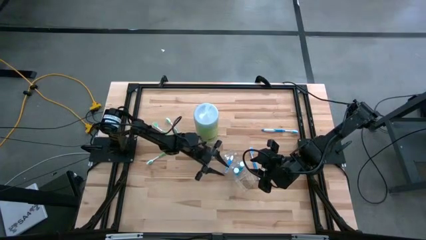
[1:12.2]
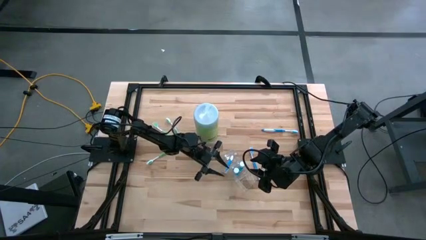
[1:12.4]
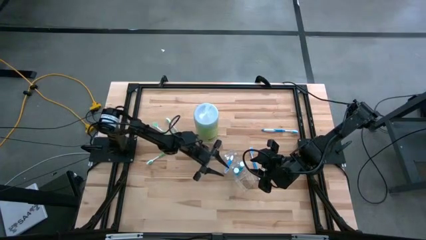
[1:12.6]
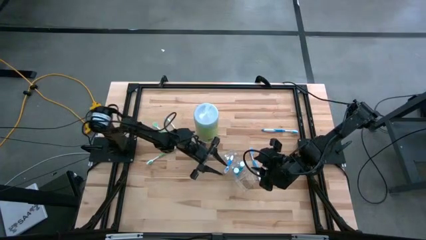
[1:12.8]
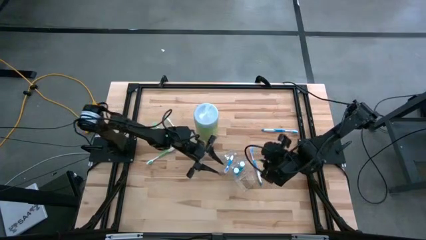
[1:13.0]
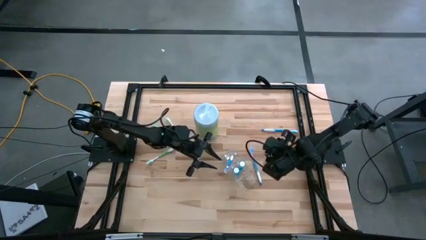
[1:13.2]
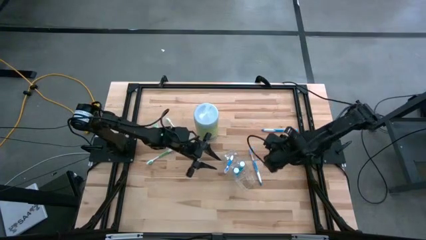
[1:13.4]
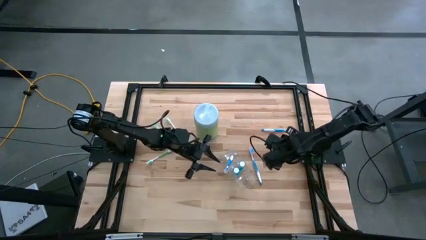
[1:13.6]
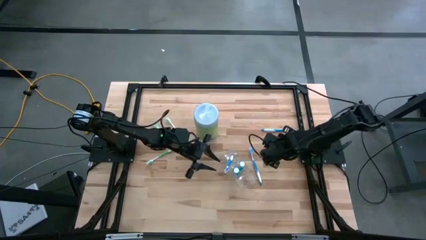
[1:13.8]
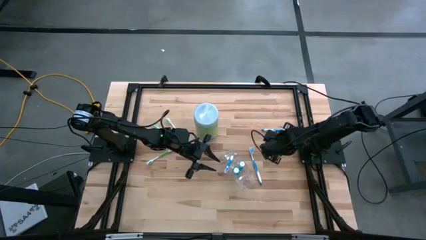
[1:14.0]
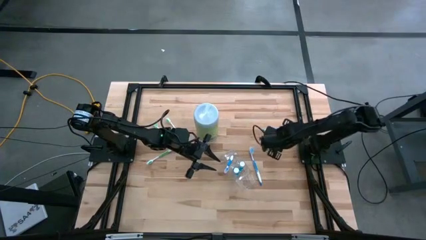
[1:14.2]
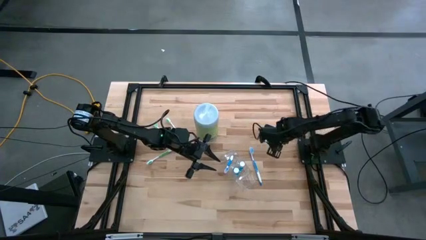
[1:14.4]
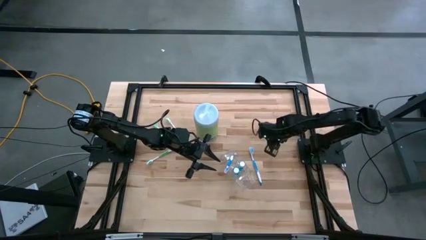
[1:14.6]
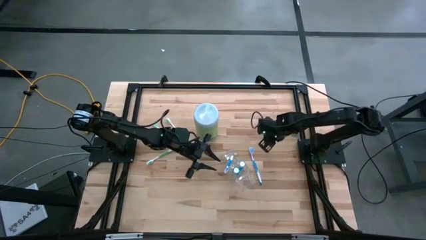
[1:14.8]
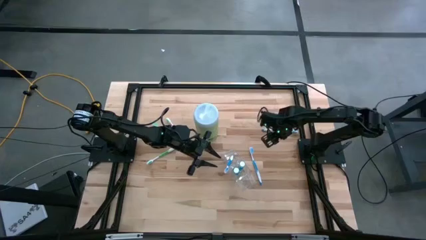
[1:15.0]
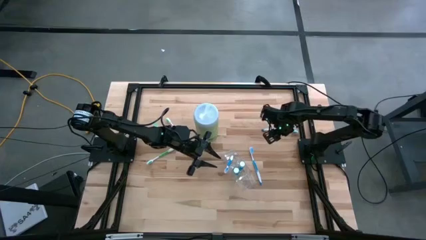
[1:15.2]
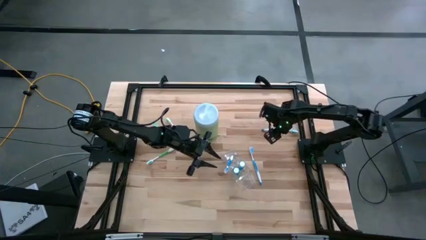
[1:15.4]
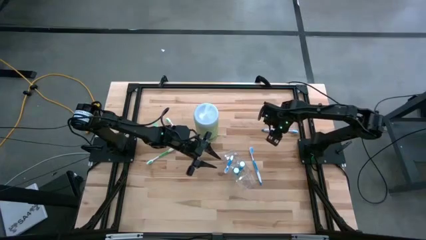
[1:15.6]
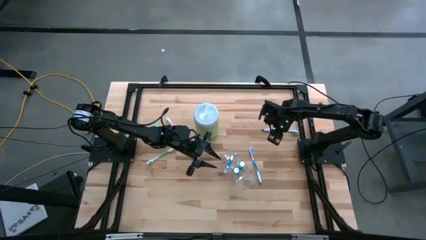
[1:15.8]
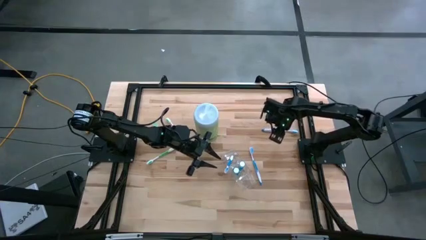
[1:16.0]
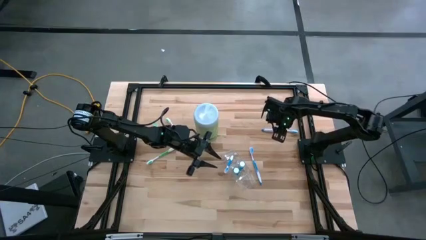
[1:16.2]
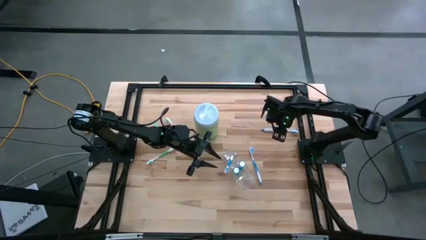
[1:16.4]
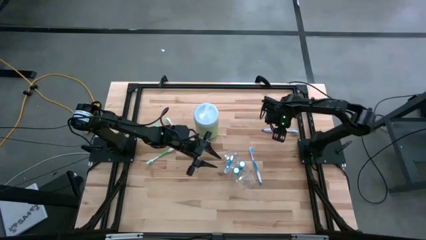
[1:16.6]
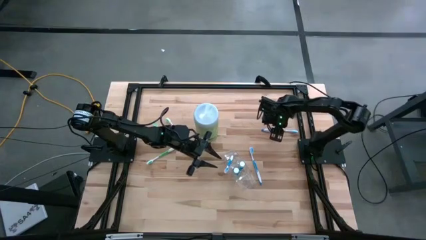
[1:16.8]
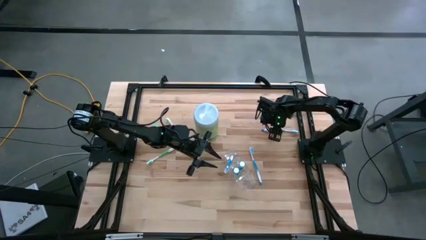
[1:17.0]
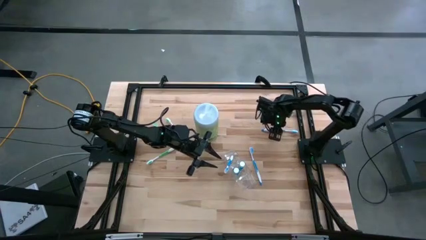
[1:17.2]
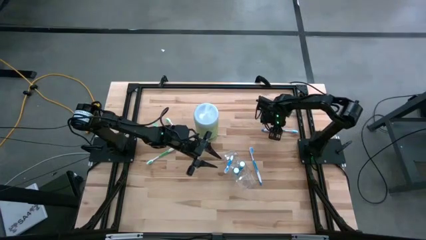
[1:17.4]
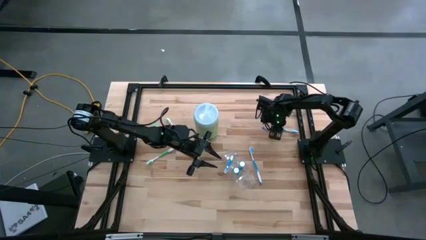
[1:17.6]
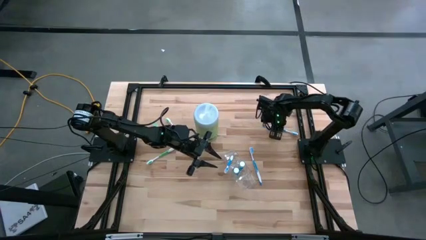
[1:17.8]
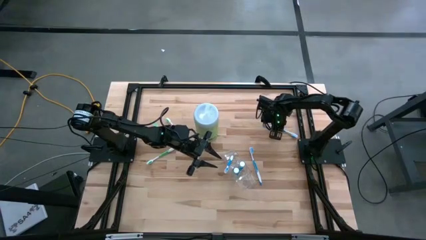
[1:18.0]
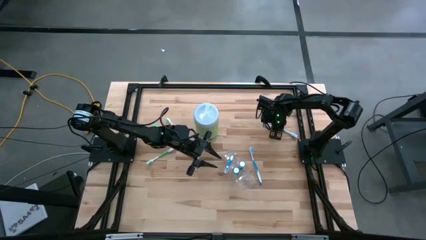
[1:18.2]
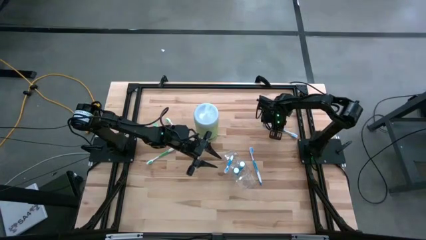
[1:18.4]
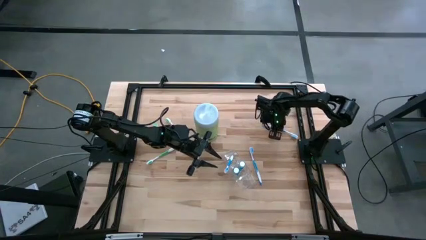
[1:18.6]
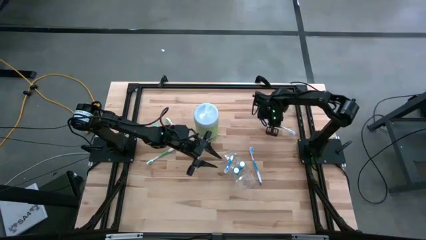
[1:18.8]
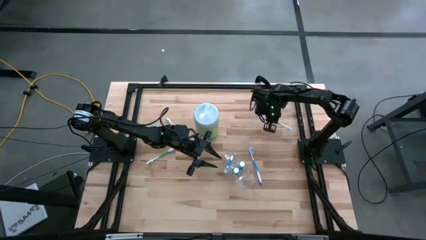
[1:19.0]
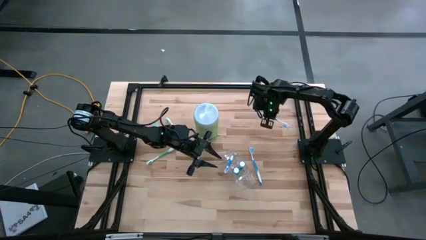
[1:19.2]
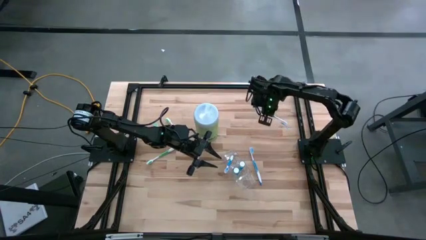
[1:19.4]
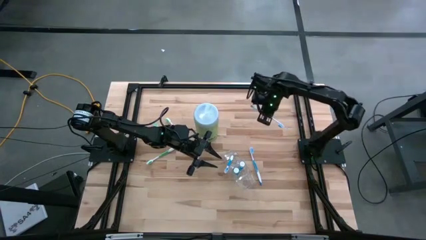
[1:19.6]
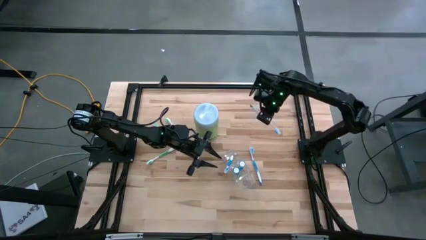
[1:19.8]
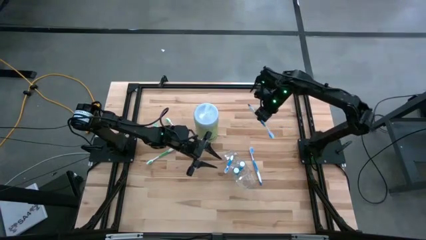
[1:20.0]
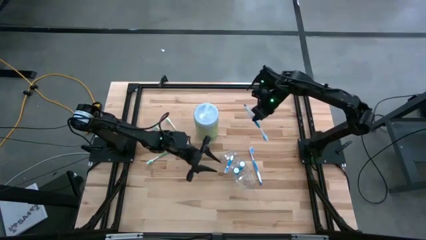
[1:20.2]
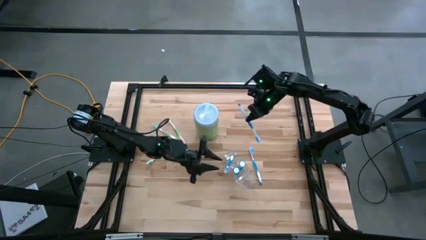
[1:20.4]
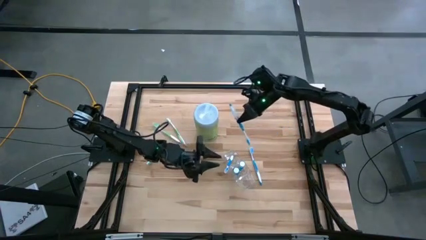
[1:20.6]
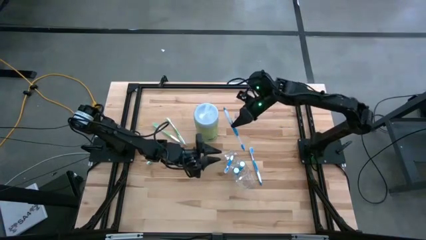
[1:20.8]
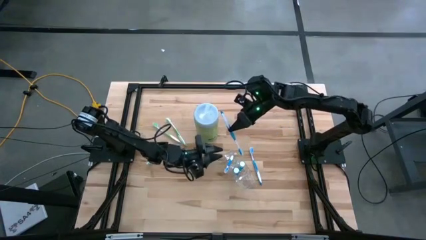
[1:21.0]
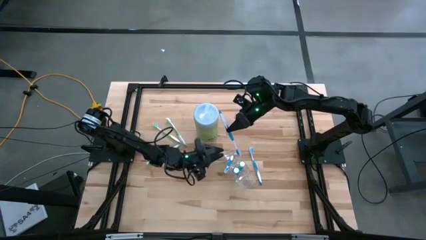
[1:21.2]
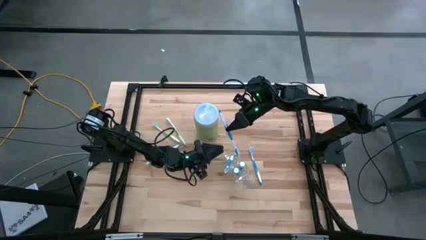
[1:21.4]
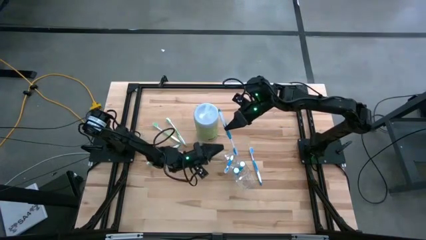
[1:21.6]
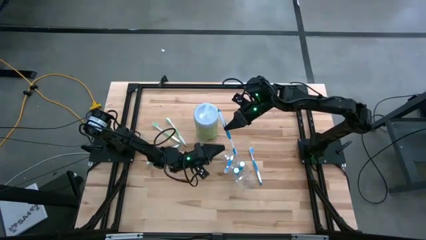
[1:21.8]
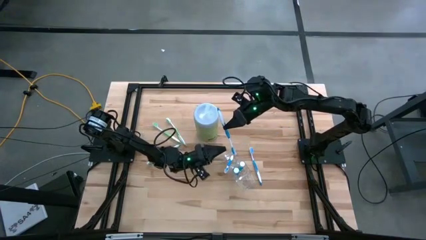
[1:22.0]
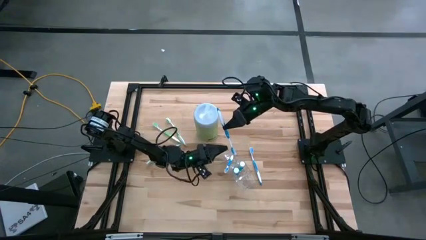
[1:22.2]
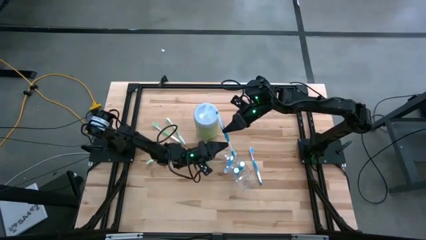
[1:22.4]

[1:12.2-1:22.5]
Task: Pick & Place toothbrushing station
Put the top blue toothbrush into the transparent organizer

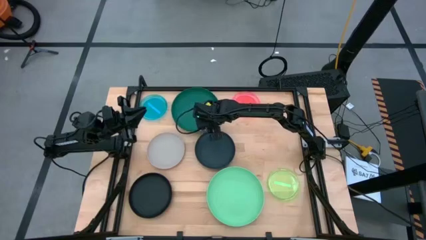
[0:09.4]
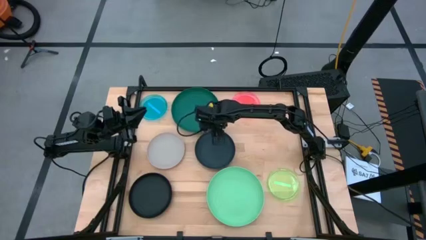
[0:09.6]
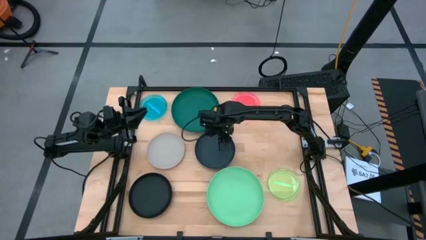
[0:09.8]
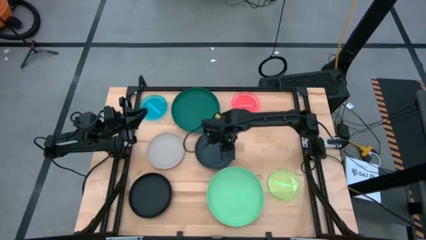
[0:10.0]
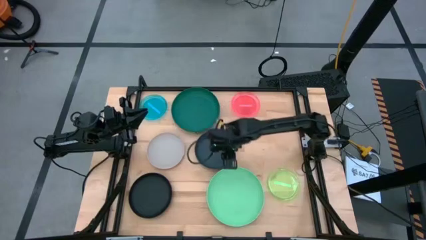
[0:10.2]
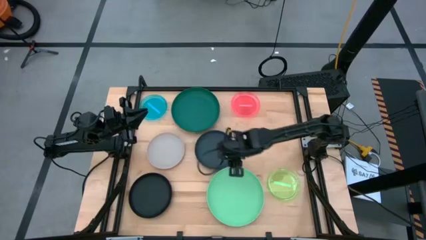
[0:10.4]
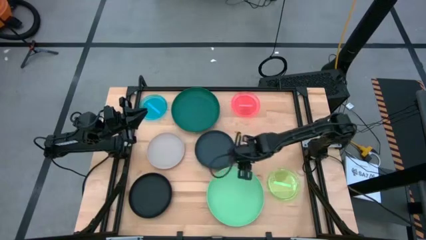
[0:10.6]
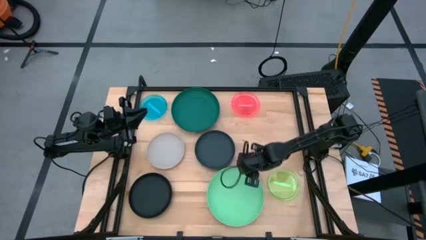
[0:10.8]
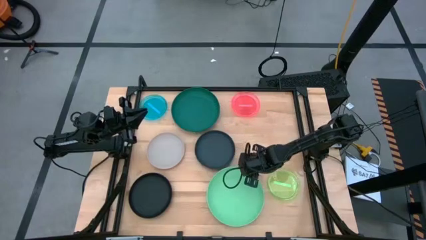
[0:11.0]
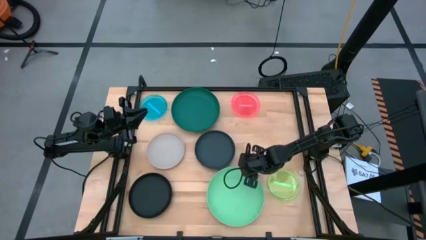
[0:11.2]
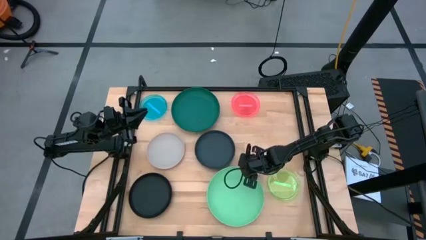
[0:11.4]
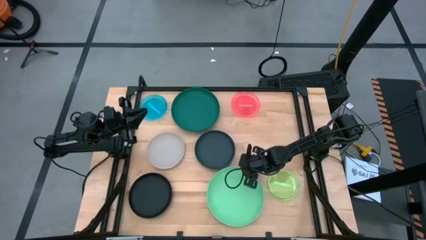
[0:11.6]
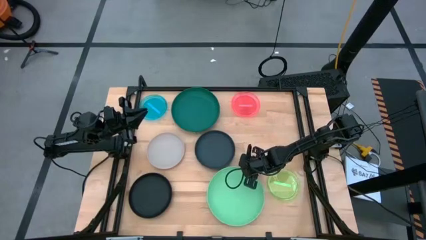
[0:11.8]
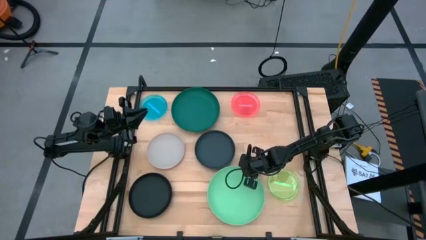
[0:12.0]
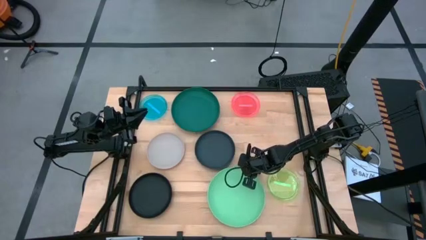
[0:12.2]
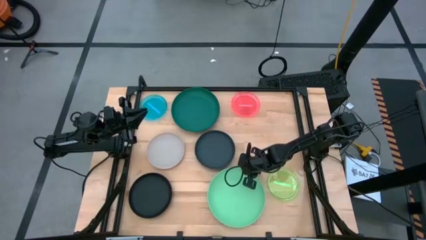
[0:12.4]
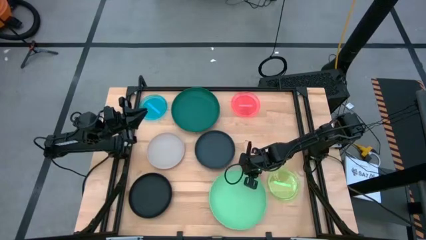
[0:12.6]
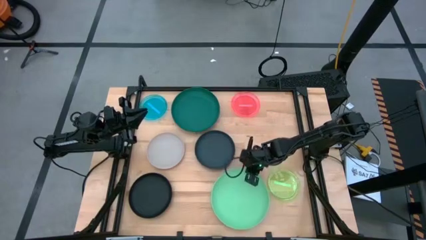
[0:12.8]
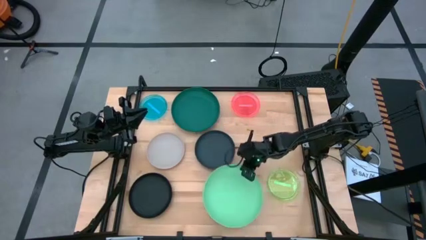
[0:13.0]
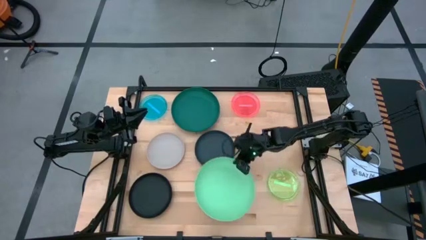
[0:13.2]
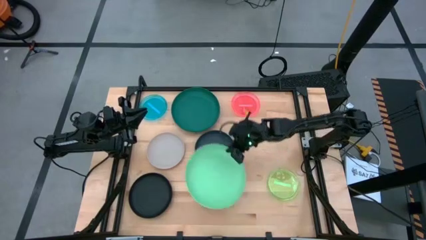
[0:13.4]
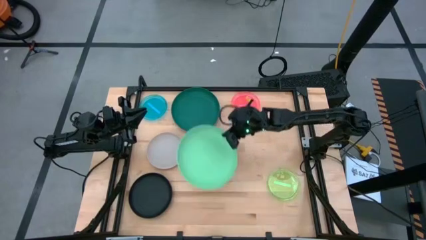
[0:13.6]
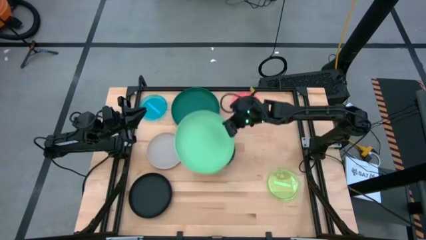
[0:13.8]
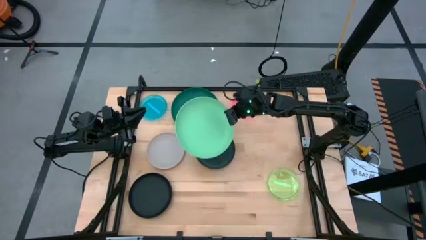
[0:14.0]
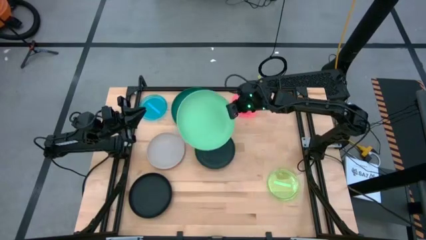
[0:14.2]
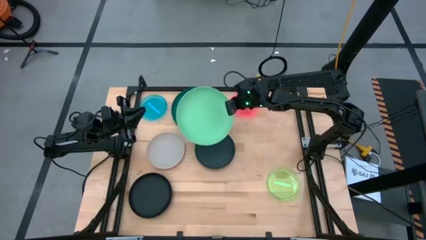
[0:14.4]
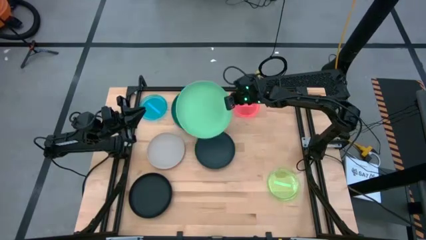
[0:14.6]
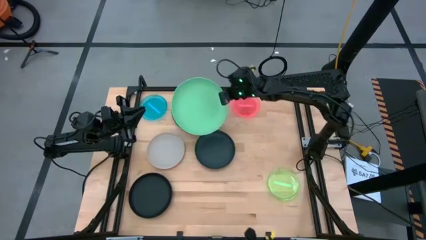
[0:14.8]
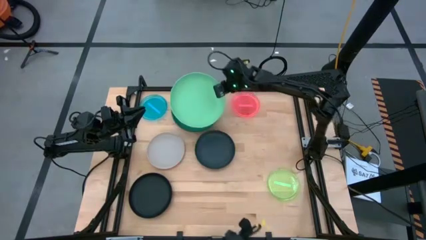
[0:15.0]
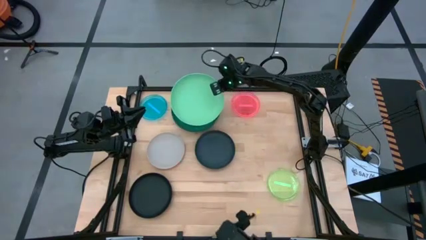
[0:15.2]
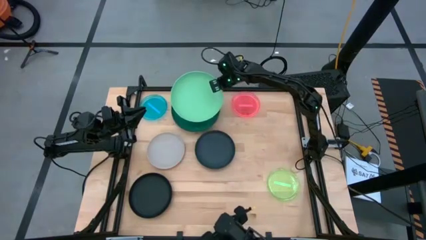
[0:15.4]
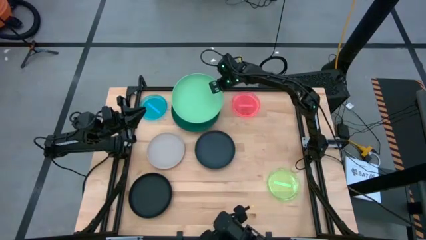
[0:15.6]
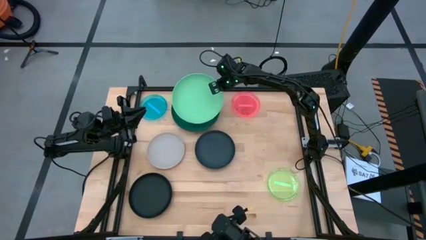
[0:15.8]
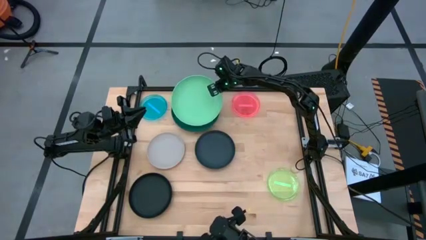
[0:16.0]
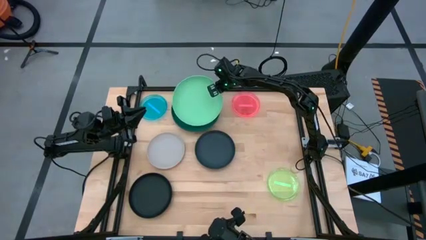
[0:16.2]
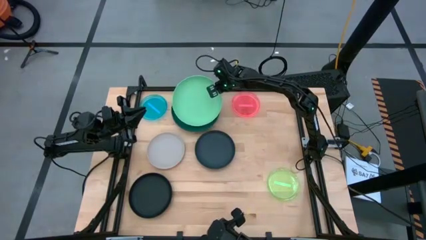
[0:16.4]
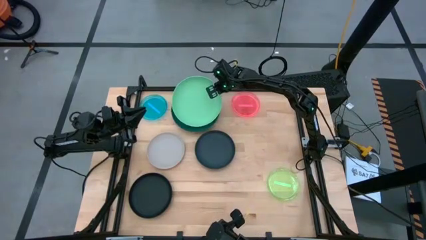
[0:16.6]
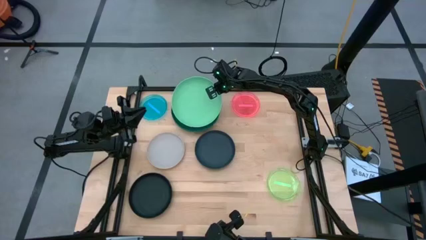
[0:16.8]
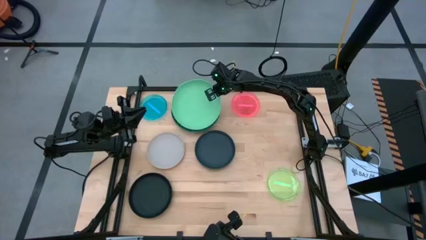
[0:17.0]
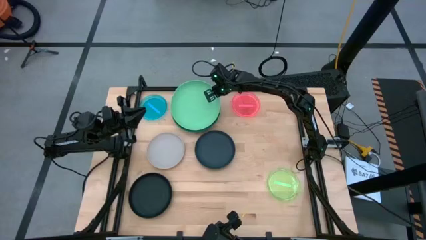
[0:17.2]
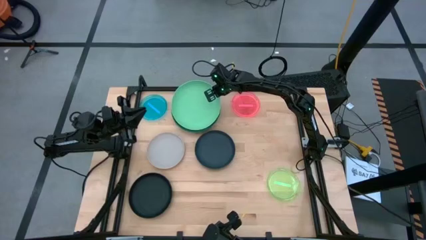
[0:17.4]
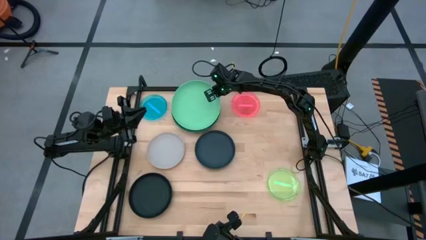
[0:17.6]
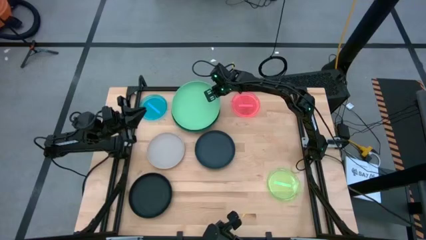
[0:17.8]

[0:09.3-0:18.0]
Task: Stack plastic plates
Stack the light green plate on the dark green plate
